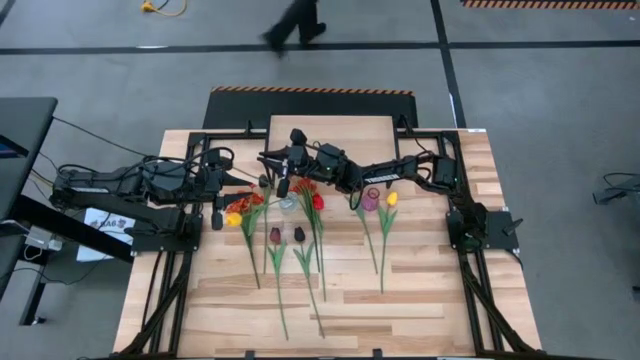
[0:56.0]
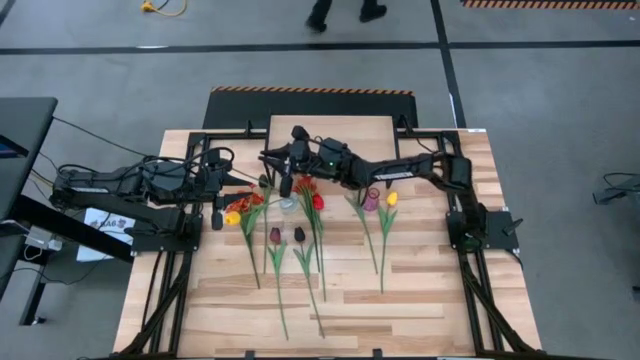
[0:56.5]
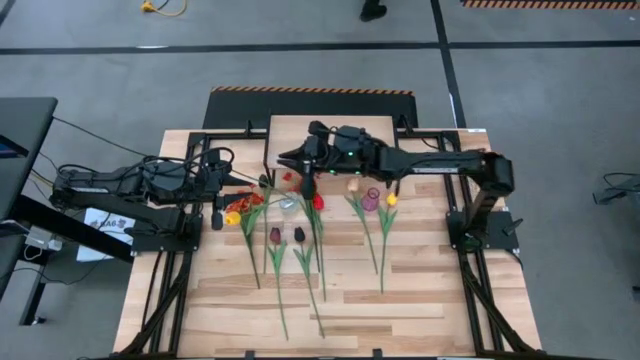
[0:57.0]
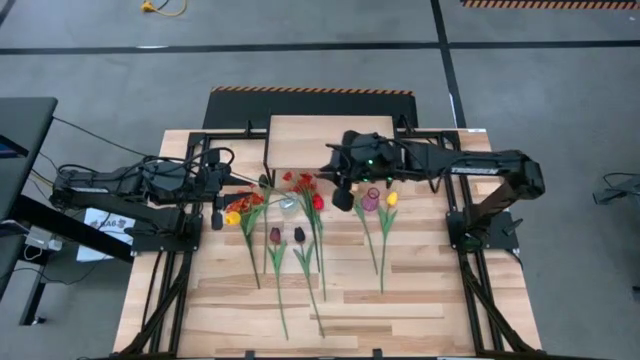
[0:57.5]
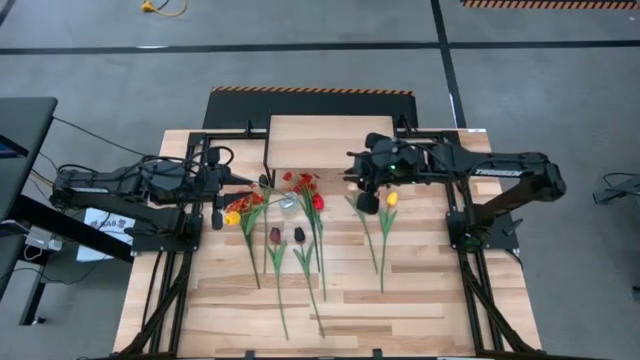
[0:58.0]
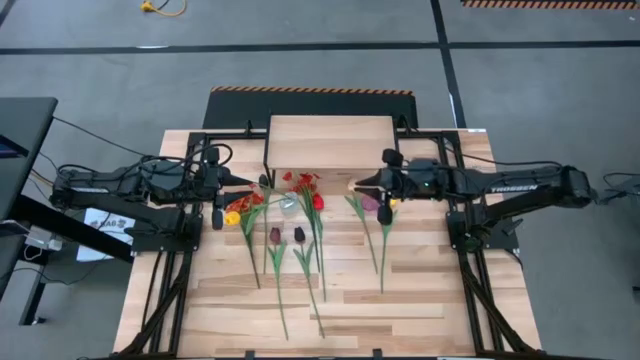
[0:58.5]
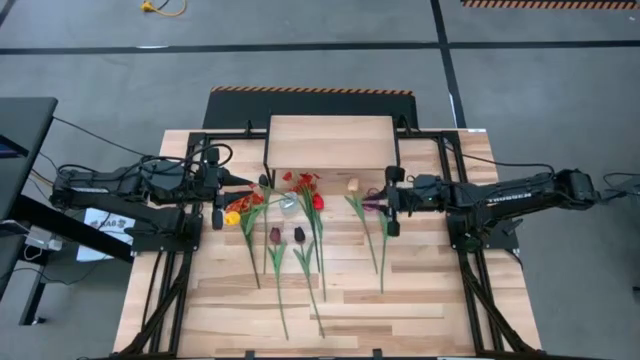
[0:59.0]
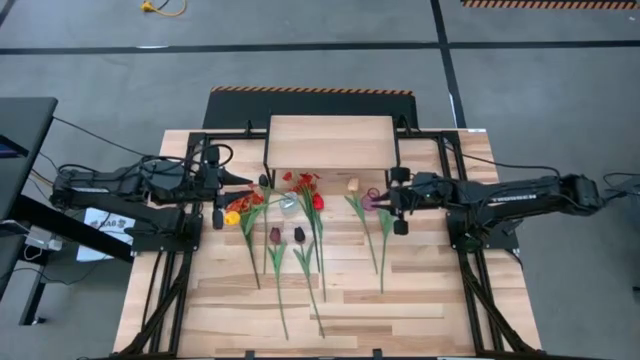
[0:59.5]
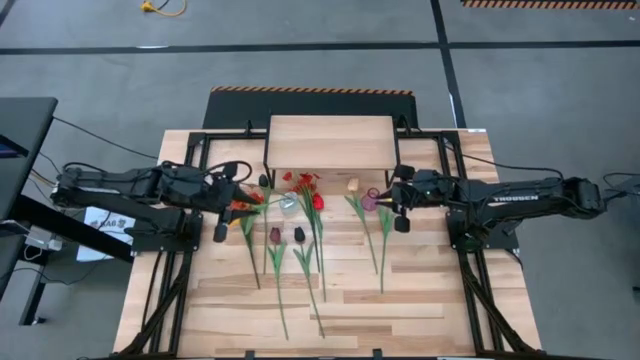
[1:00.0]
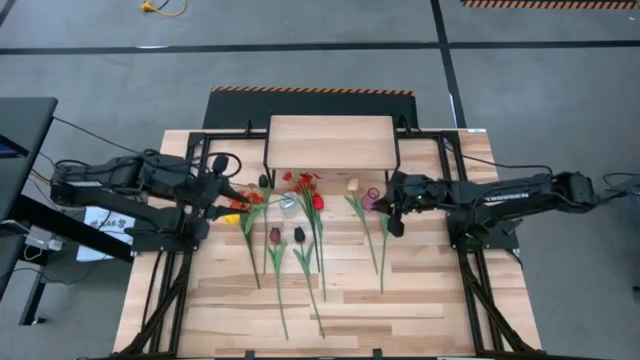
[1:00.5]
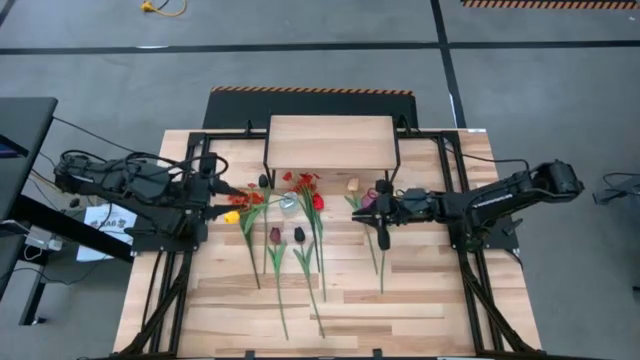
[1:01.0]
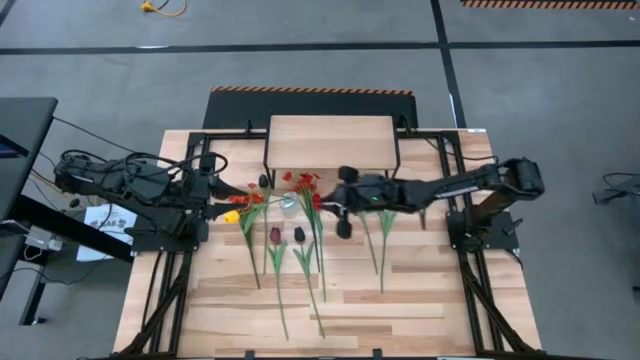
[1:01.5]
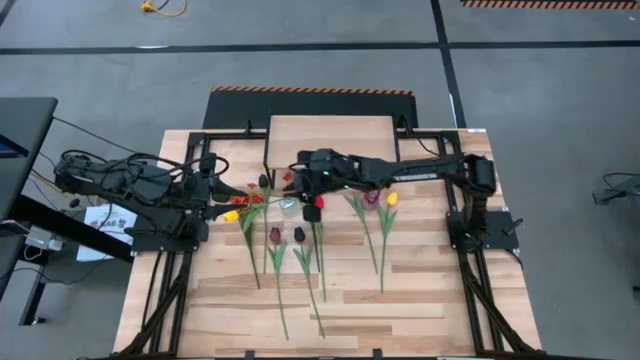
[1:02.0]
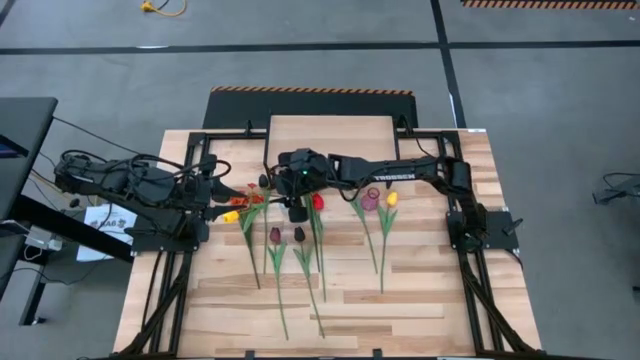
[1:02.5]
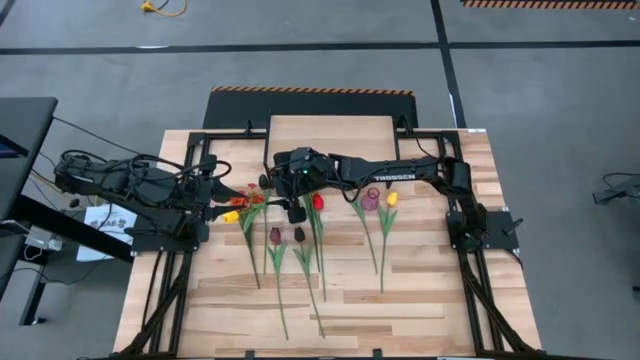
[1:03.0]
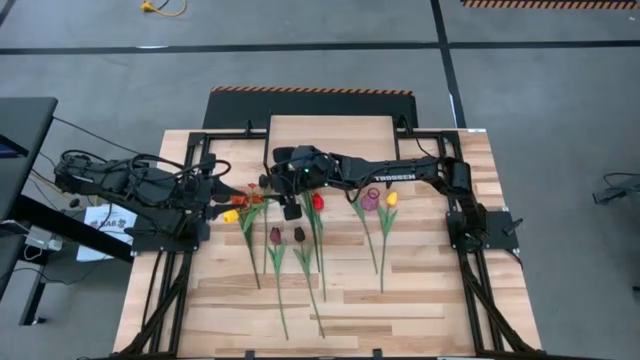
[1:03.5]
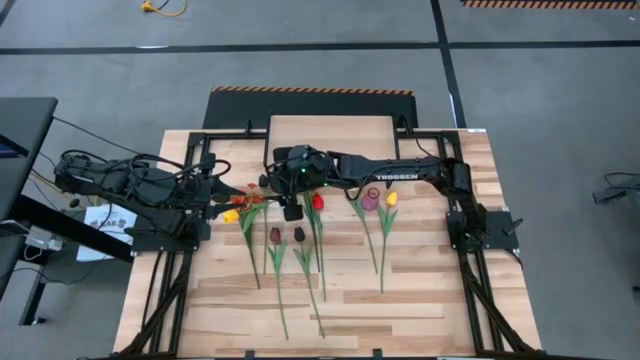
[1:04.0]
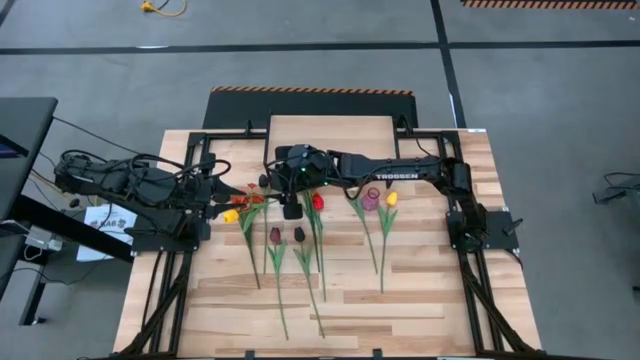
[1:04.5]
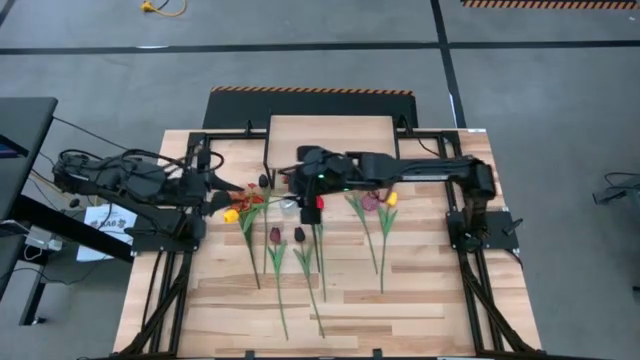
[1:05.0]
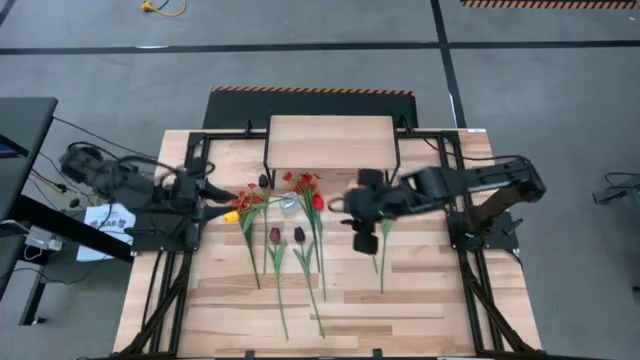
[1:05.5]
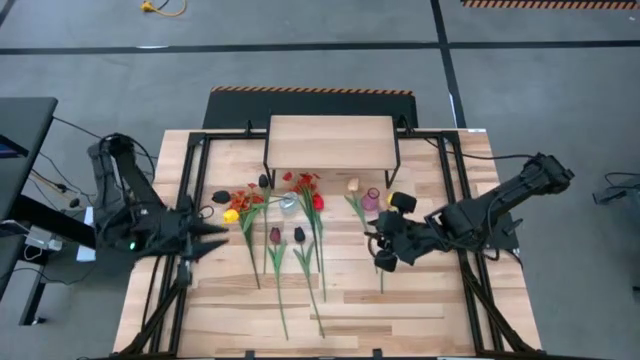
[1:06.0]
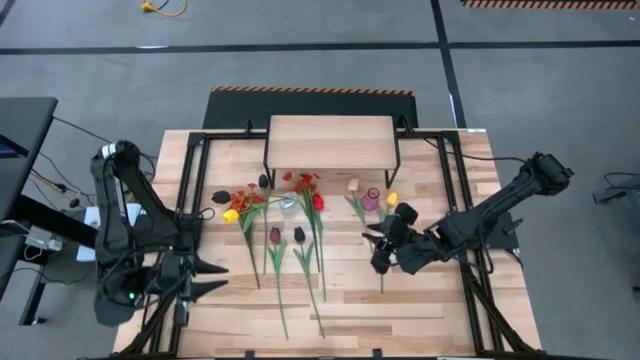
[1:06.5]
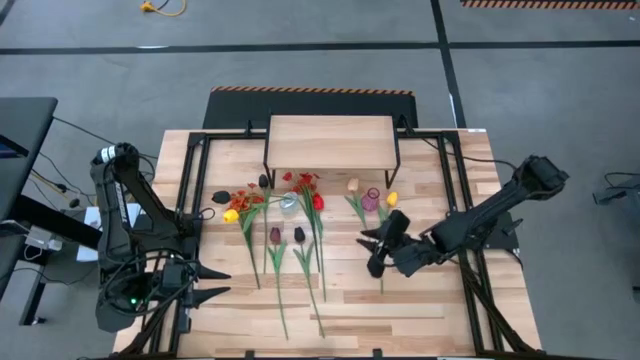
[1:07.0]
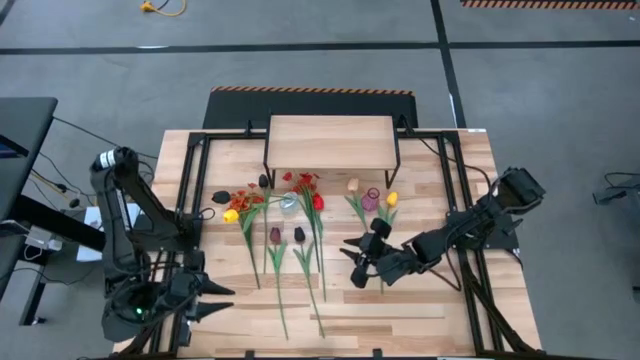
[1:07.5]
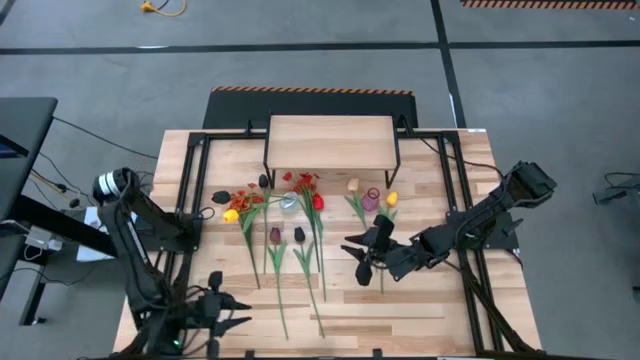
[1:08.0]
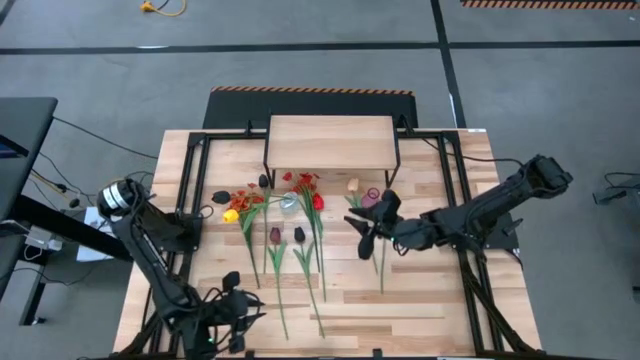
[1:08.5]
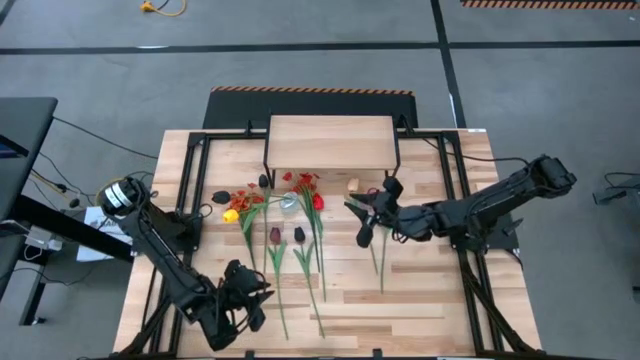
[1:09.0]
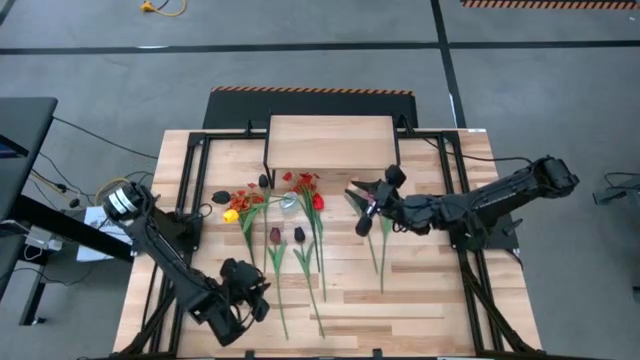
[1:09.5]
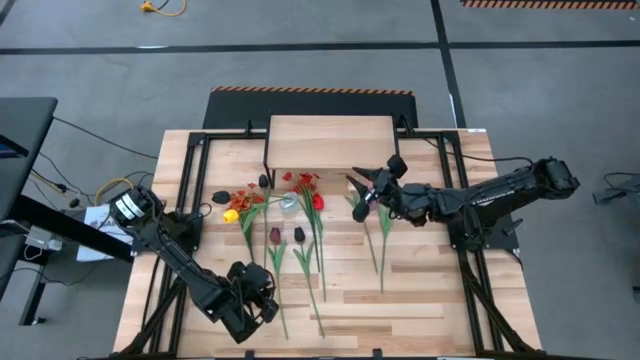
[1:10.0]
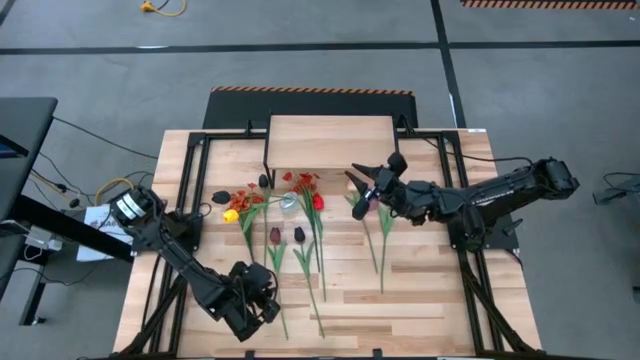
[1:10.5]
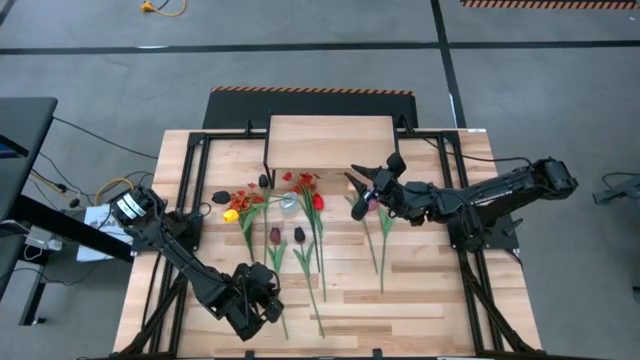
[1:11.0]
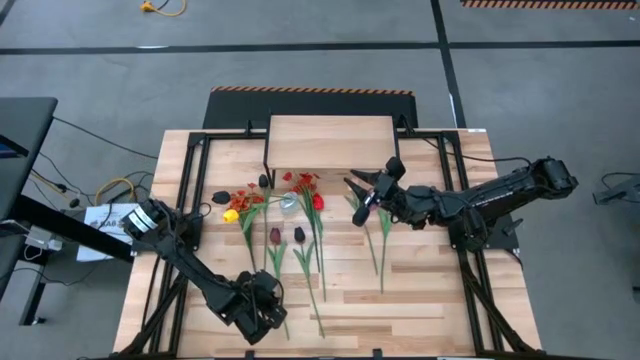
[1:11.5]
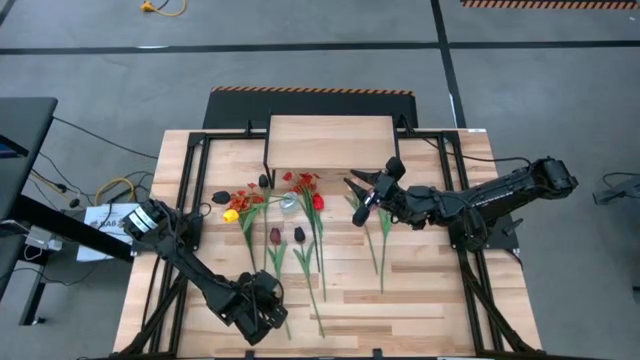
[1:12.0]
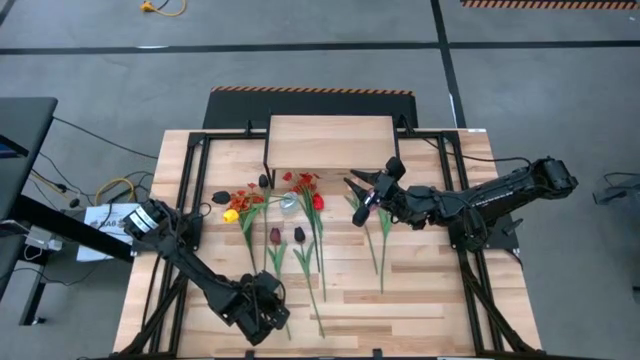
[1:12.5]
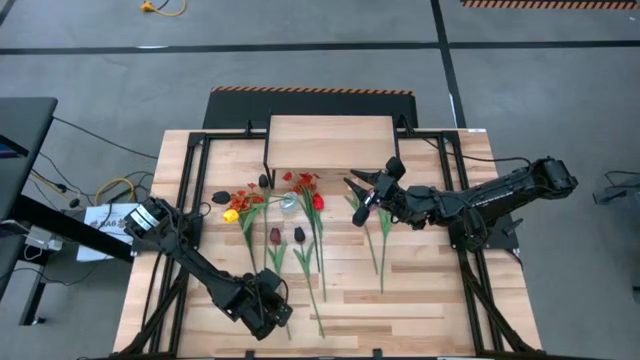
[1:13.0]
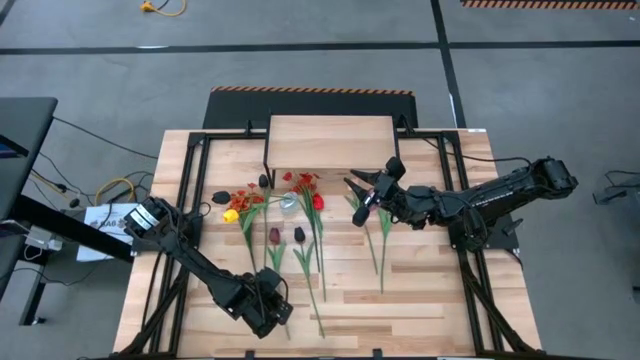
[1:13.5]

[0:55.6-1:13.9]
Task: Pick and place flowers into a vace then onto a shelf
Put the dark red flower into the transparent vase

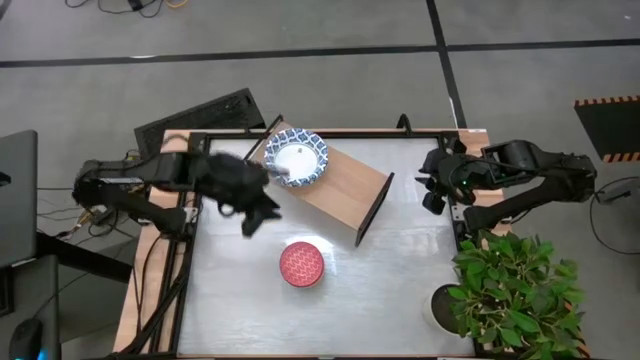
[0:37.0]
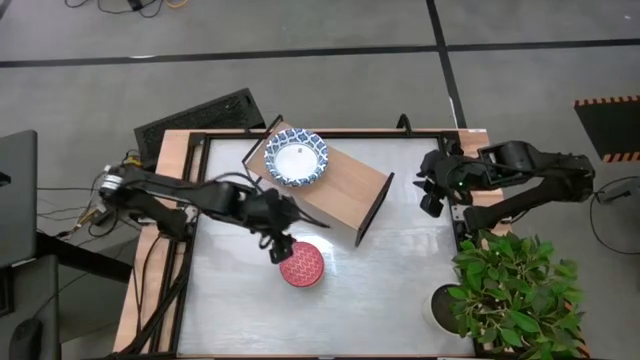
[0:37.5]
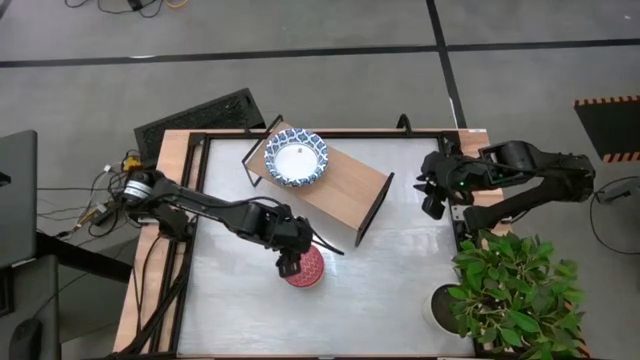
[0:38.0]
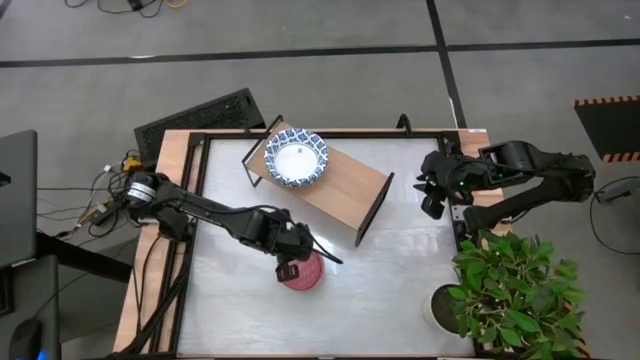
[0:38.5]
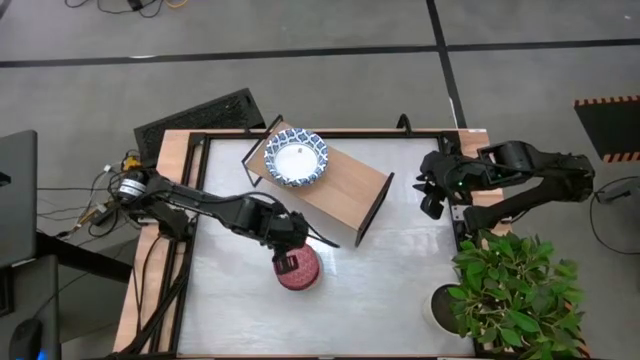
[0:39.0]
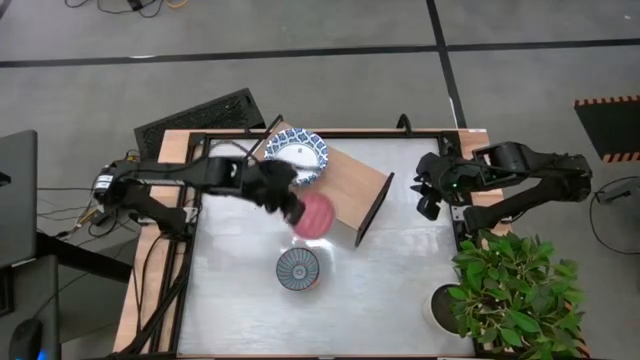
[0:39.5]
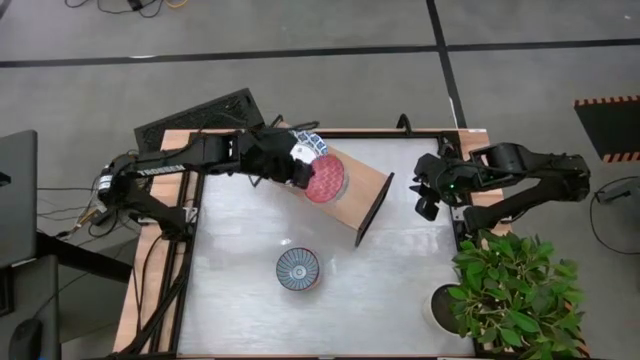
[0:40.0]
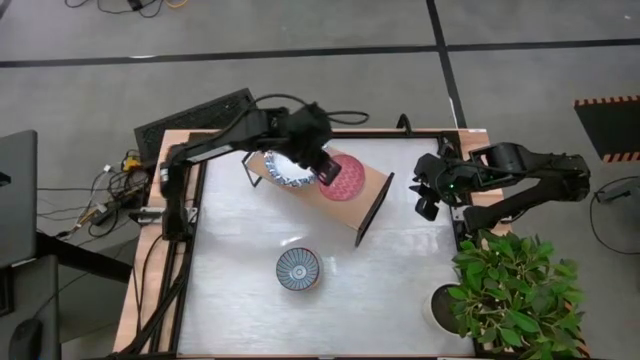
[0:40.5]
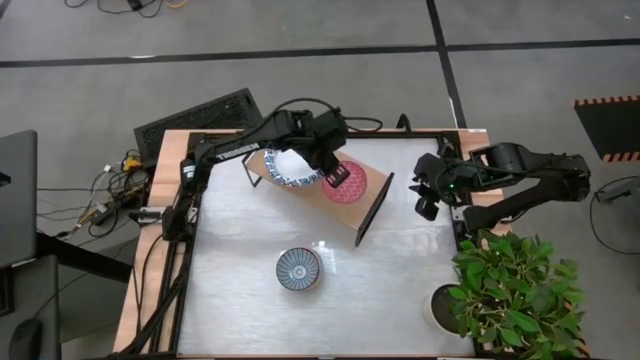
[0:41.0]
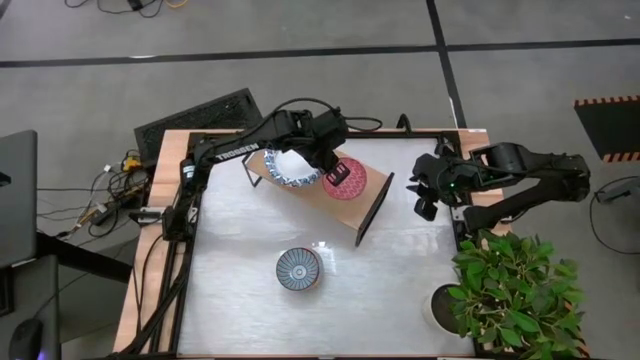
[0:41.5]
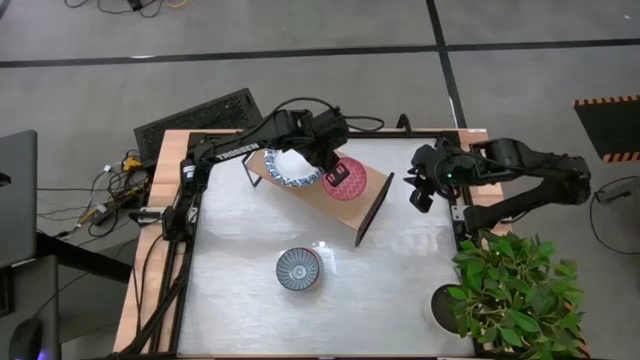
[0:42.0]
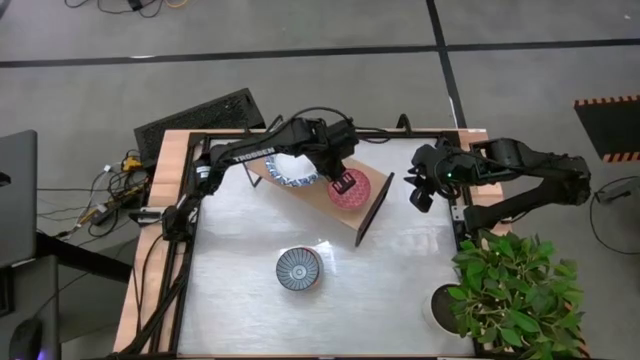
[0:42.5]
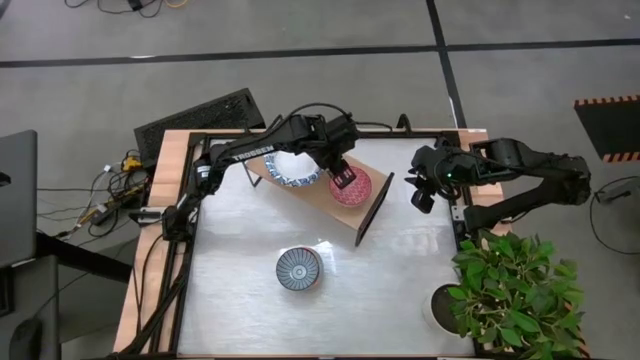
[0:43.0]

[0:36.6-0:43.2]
Task: Place and stack bowls onto a shelf
Put the red bowl to the right on the shelf
